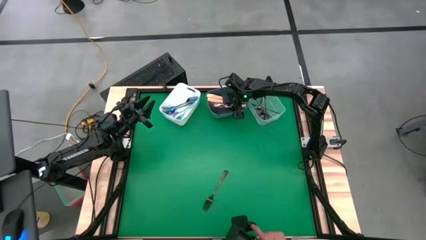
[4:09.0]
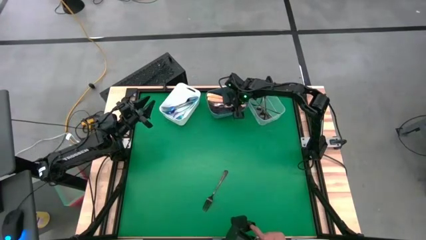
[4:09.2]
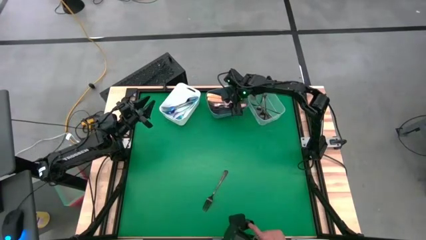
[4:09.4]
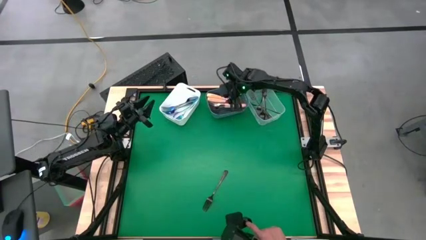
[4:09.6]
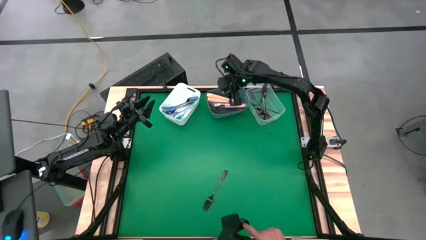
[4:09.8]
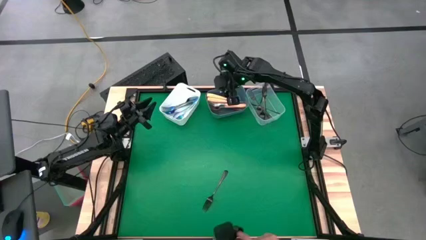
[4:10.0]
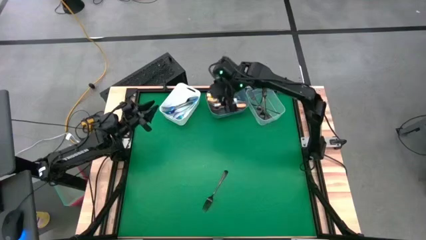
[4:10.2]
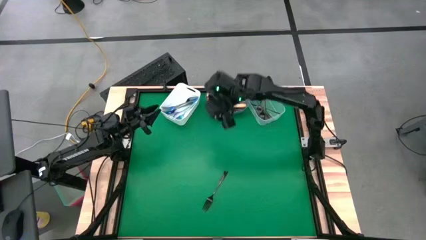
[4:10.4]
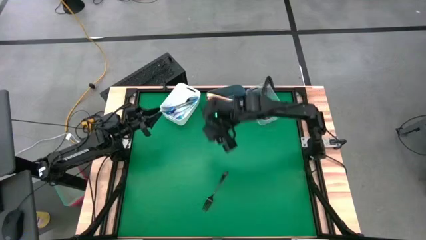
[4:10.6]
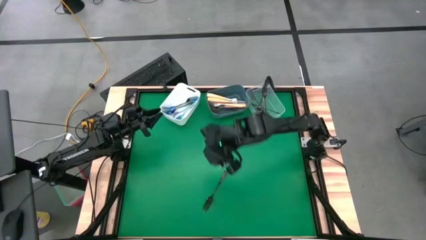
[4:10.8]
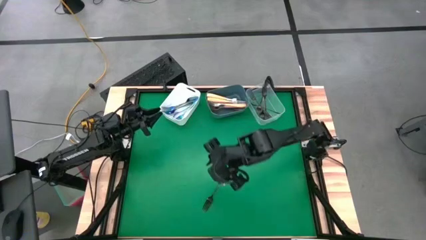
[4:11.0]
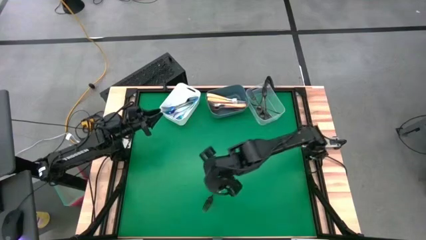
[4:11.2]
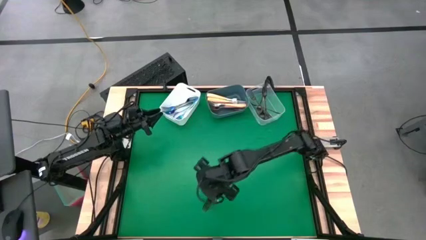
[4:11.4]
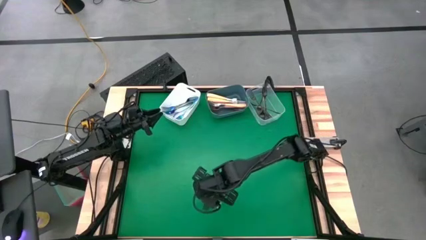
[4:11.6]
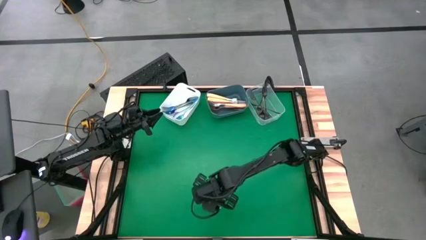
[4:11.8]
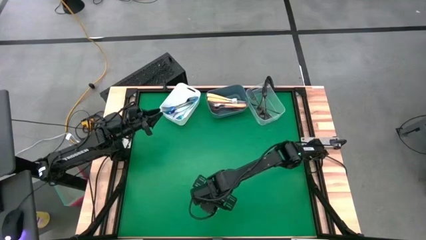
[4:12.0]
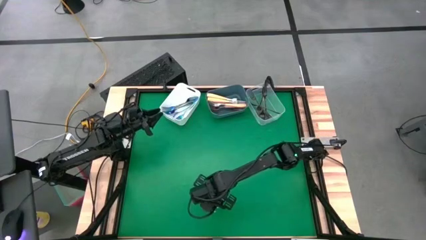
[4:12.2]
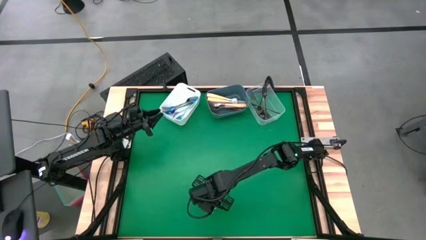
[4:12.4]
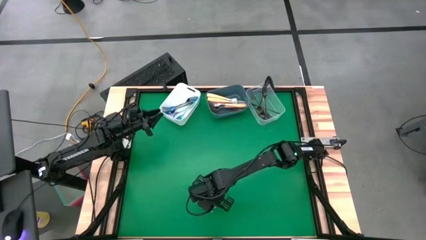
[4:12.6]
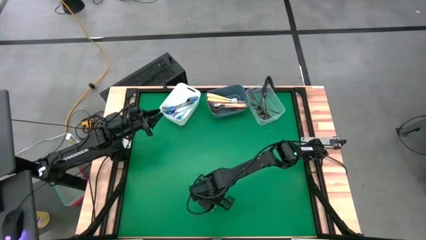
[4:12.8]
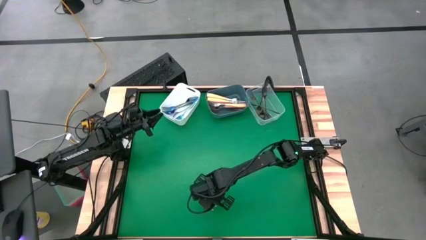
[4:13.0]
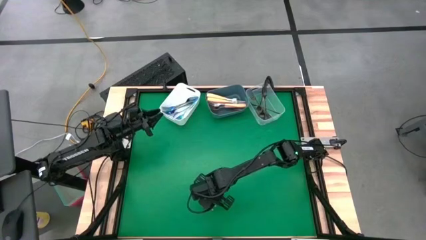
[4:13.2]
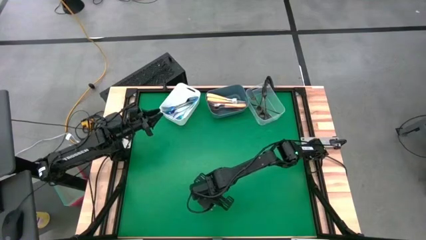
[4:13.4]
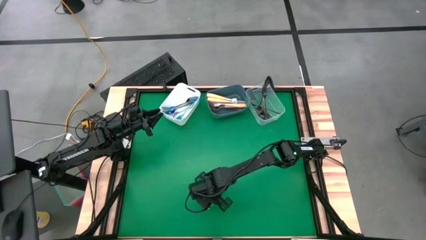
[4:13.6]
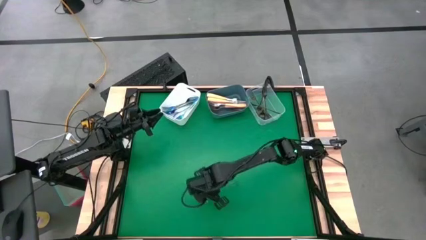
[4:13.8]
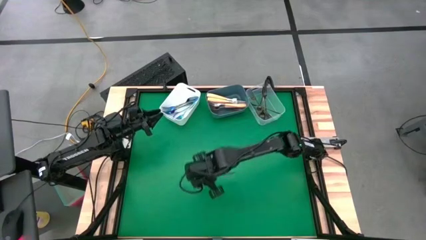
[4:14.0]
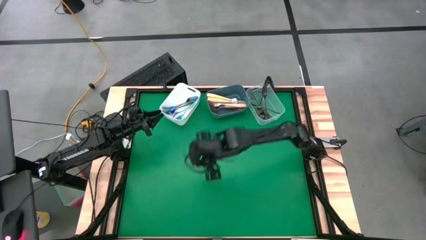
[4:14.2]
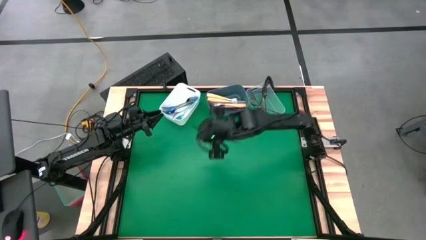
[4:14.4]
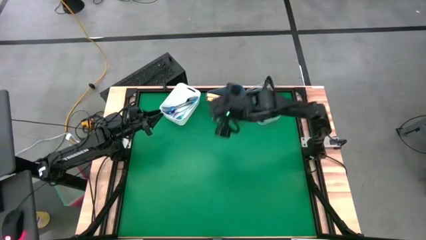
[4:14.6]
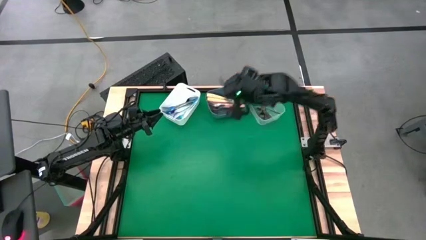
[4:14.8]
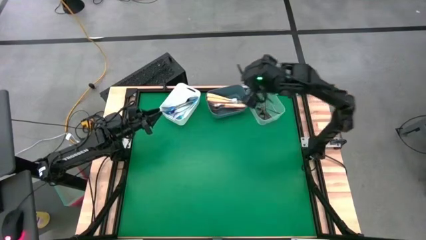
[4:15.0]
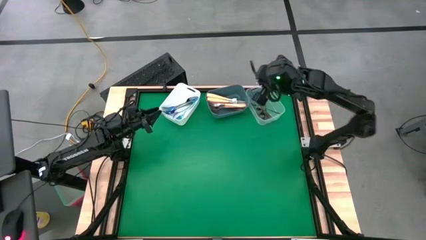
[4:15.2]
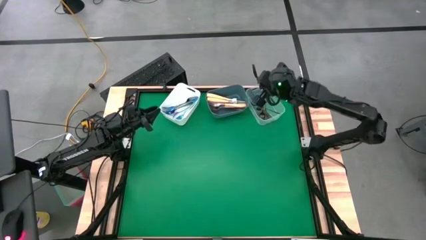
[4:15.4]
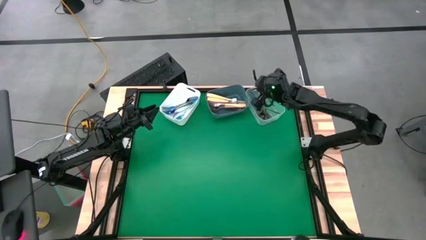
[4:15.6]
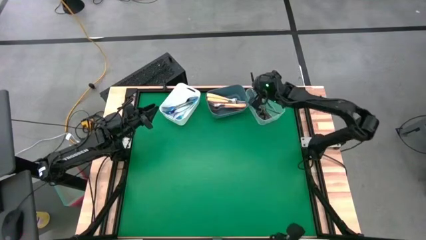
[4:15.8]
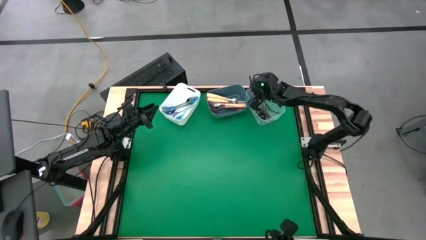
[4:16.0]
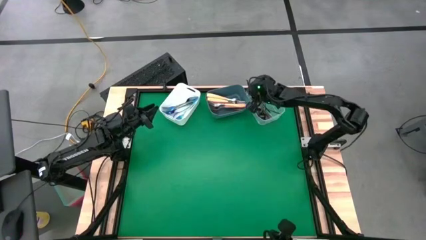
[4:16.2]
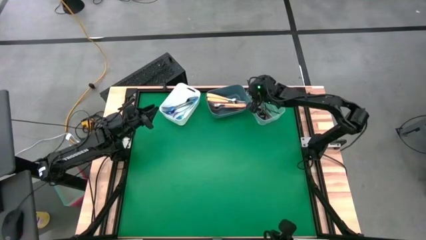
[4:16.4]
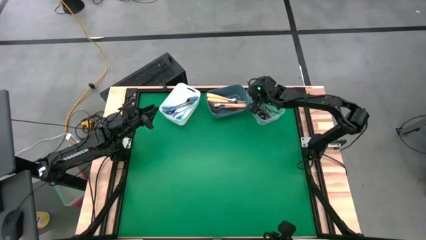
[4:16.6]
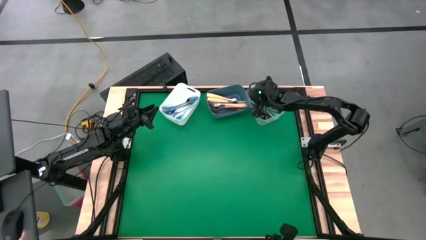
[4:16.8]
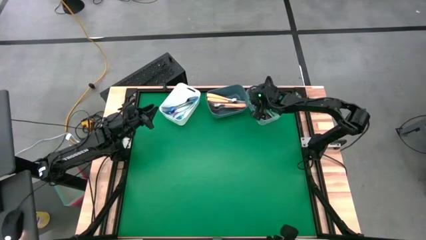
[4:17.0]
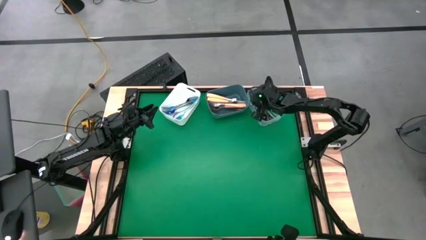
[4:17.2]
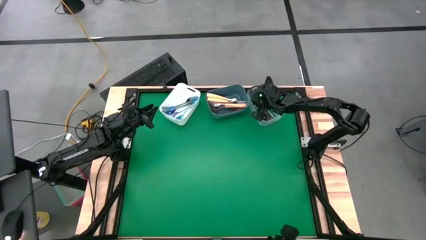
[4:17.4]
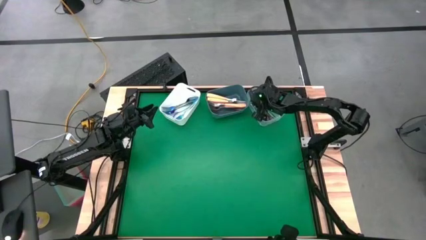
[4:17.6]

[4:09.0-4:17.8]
Task: Sort silverware by color (type)
Put the black fork into the transparent bin

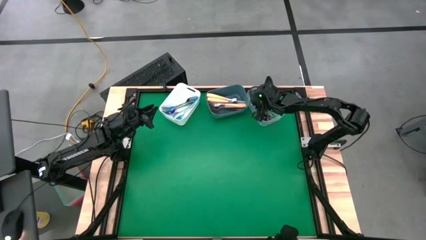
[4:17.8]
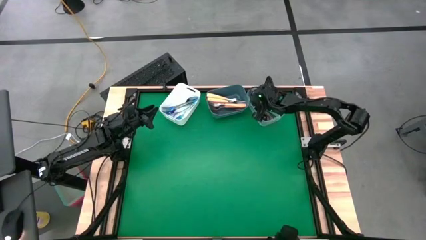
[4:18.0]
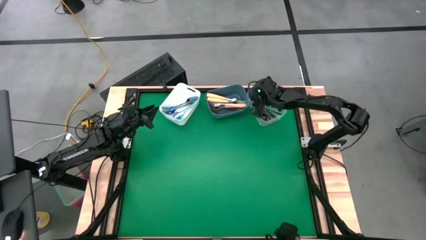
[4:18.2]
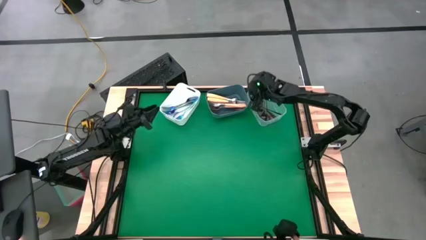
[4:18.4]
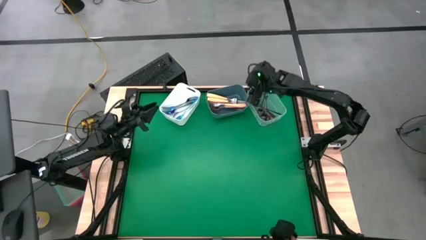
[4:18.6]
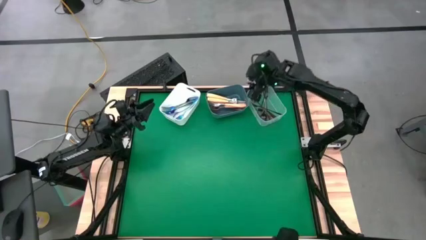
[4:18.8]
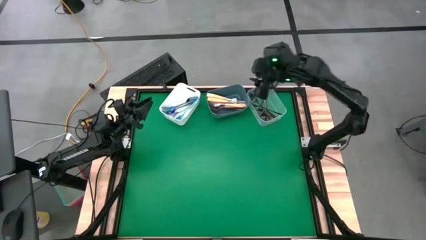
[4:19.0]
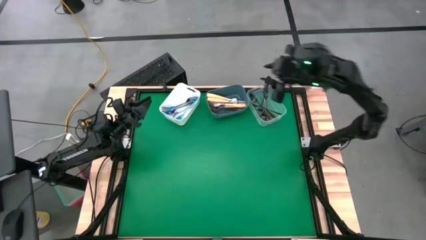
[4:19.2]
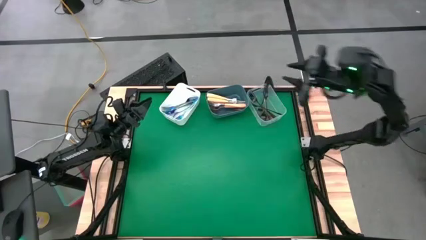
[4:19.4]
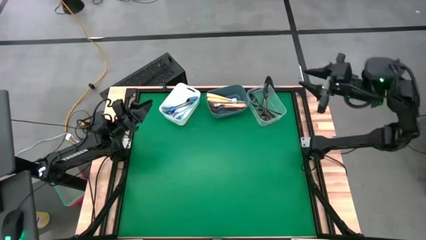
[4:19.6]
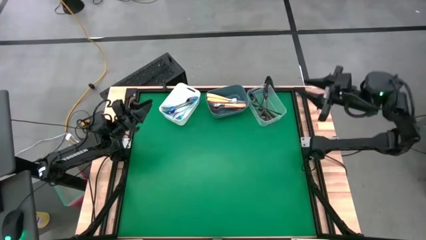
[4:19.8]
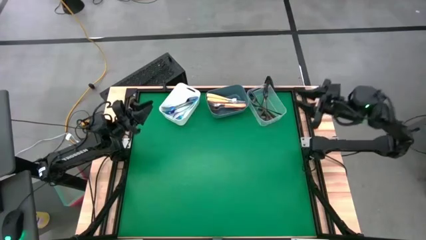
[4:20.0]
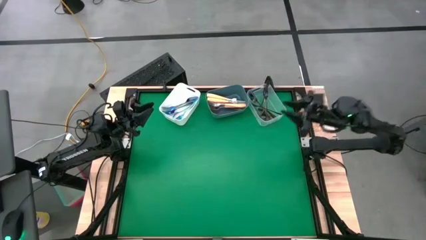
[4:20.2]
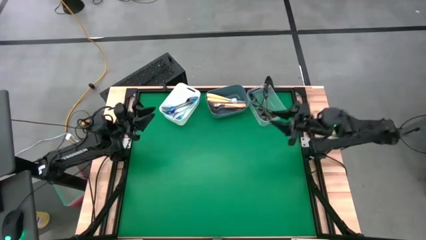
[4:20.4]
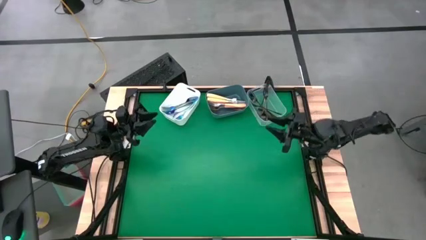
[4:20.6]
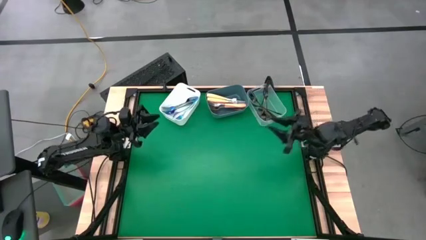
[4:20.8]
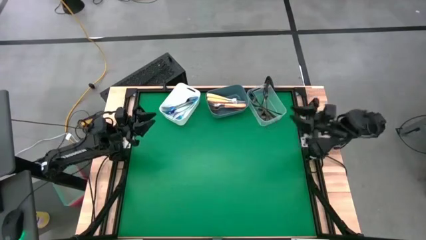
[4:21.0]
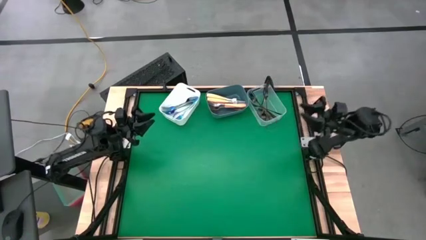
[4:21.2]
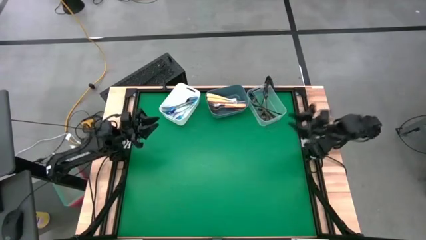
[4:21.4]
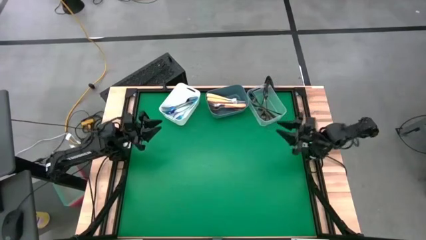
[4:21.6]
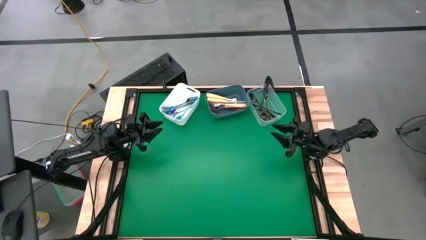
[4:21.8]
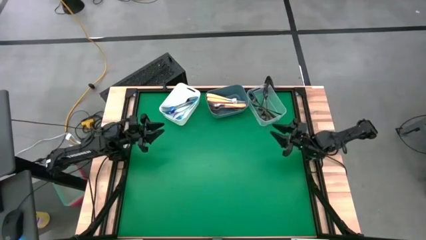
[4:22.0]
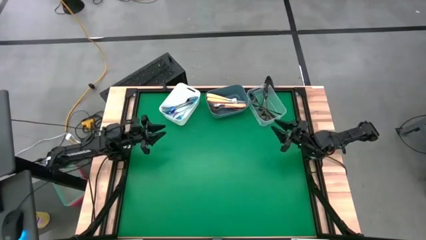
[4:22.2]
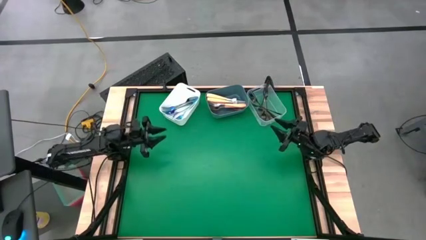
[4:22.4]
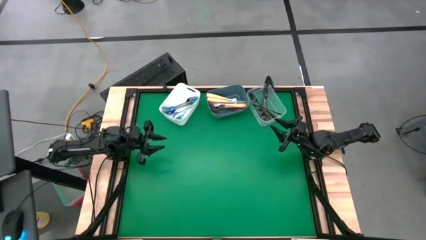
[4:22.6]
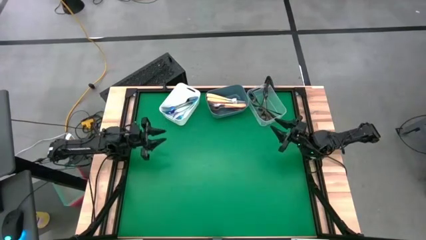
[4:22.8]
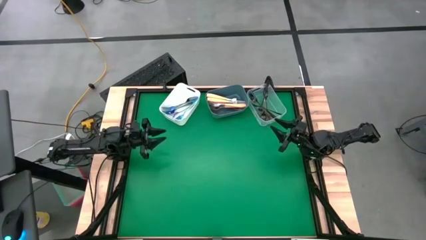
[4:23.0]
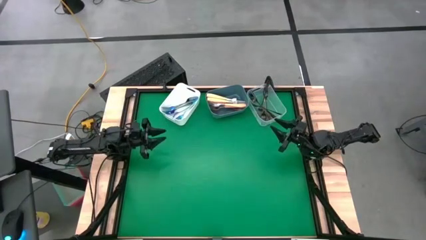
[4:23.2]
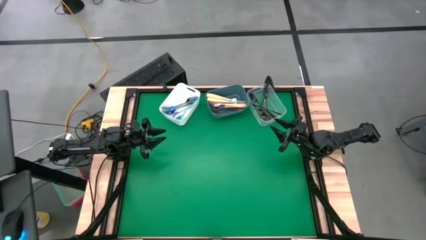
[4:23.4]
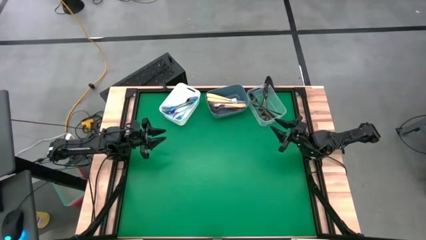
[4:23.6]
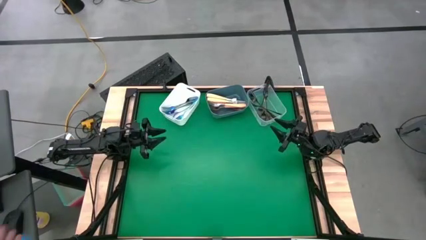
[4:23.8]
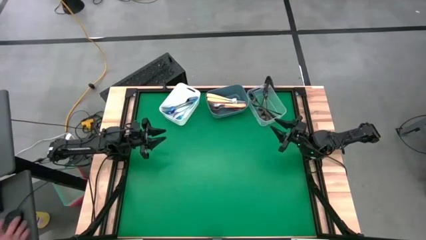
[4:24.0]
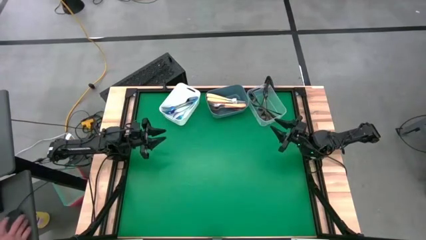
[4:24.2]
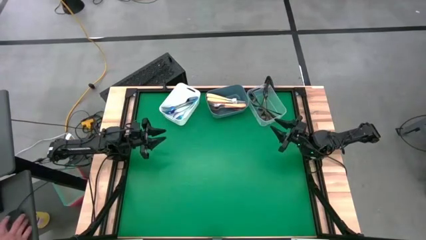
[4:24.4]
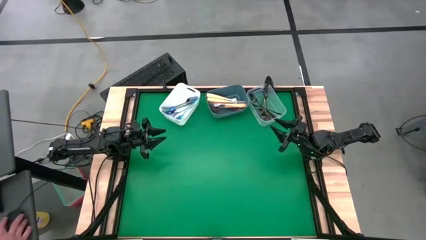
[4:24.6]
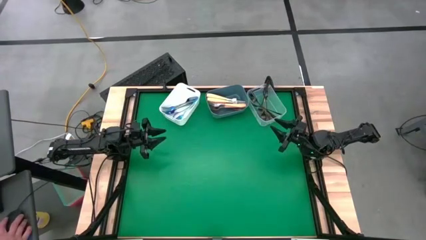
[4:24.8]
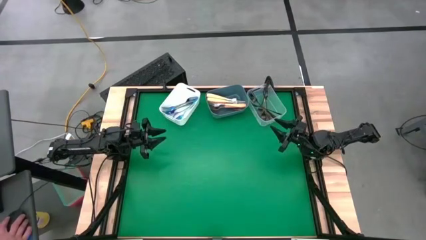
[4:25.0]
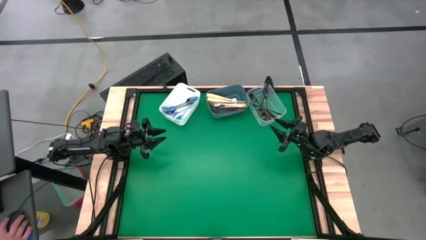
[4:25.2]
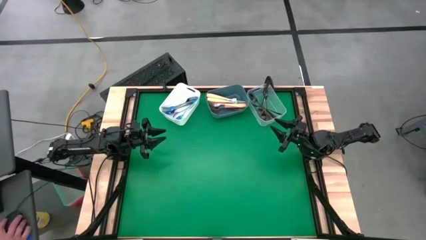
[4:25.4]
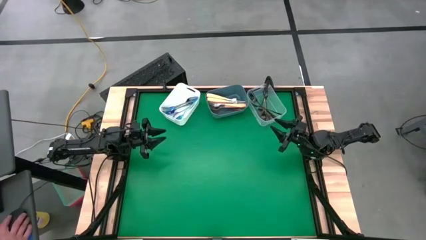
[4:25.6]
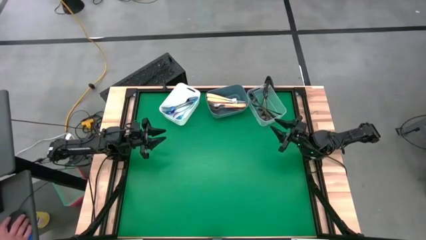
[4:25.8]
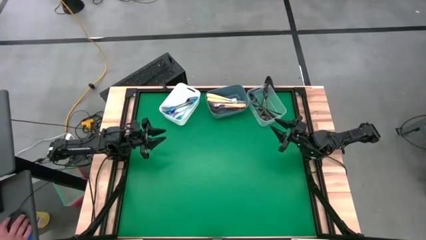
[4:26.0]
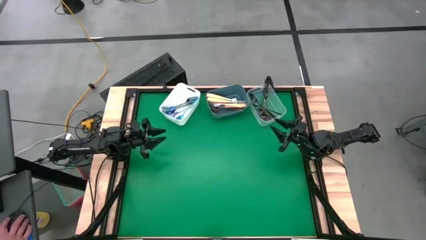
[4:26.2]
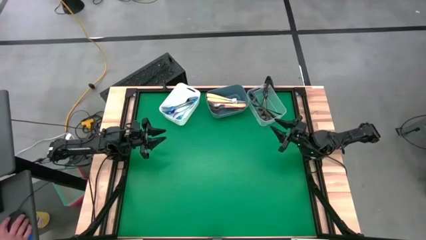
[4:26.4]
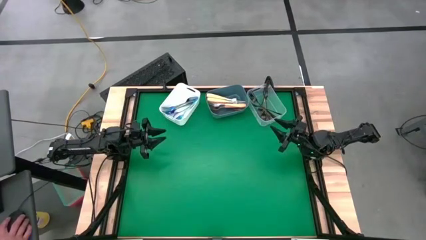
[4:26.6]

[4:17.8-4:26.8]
Return to Home Position
